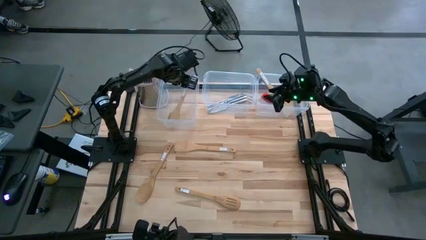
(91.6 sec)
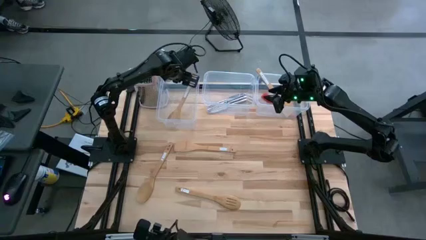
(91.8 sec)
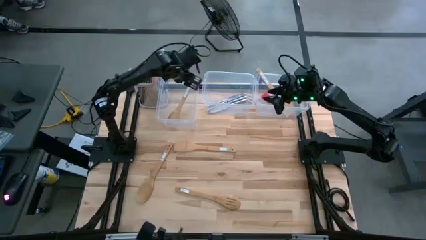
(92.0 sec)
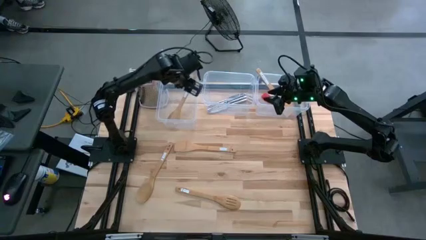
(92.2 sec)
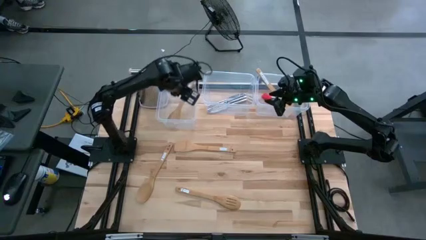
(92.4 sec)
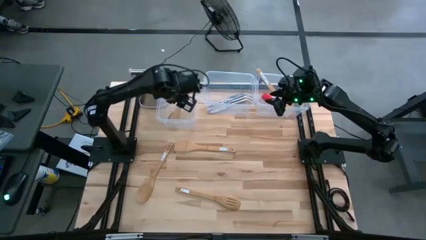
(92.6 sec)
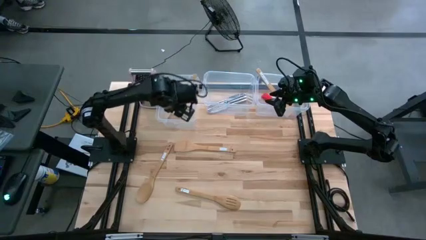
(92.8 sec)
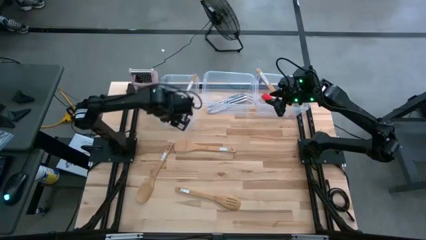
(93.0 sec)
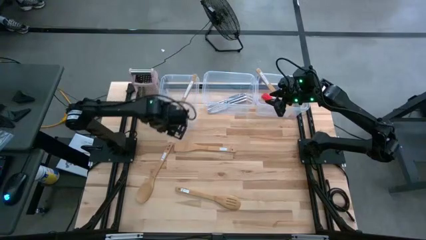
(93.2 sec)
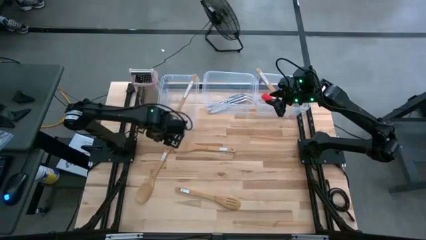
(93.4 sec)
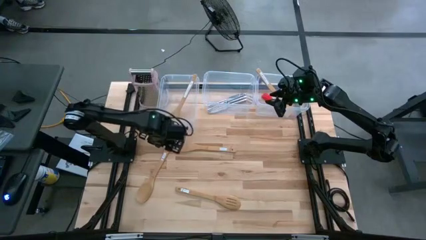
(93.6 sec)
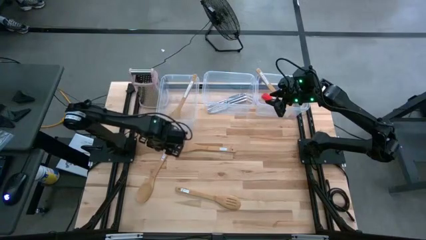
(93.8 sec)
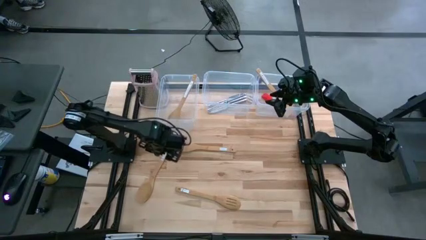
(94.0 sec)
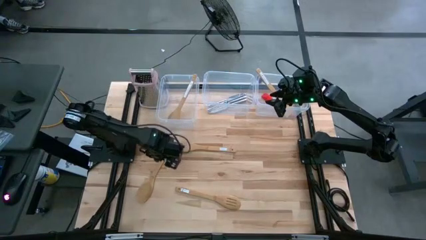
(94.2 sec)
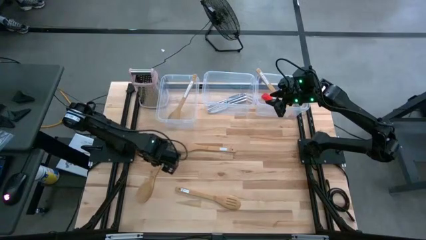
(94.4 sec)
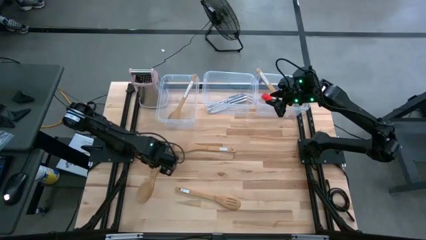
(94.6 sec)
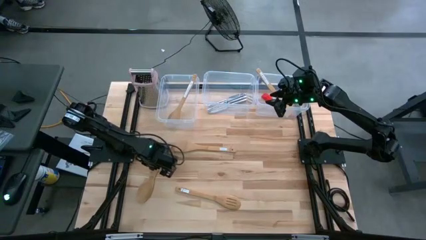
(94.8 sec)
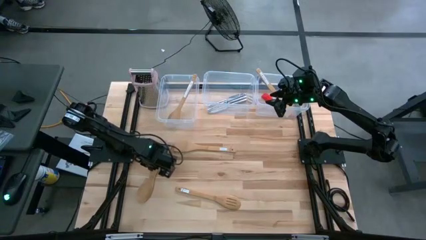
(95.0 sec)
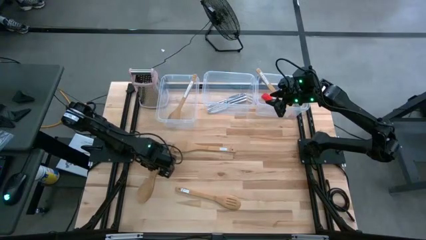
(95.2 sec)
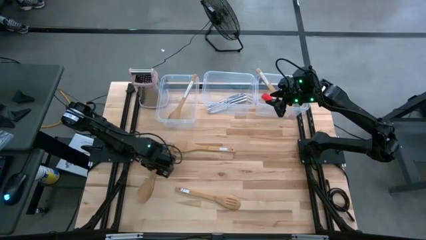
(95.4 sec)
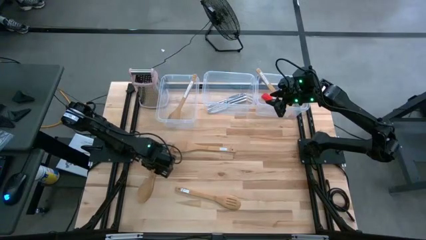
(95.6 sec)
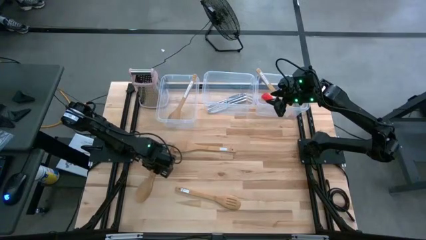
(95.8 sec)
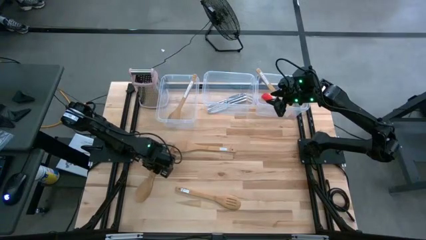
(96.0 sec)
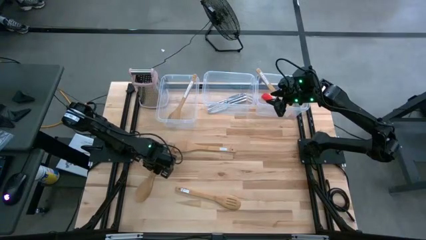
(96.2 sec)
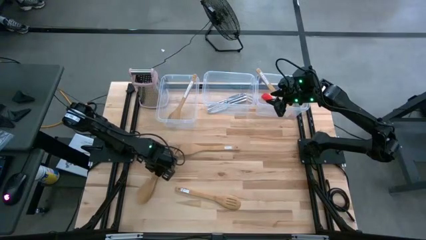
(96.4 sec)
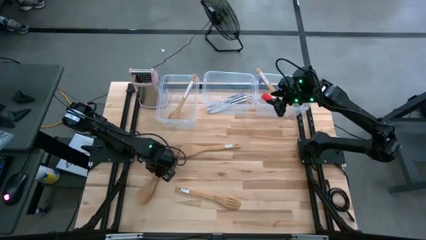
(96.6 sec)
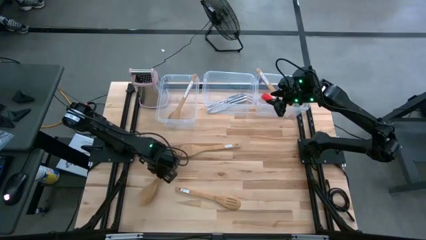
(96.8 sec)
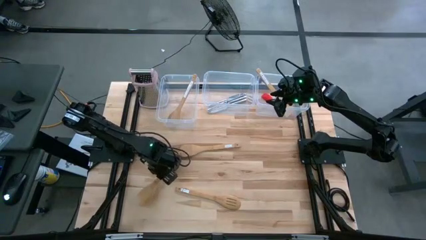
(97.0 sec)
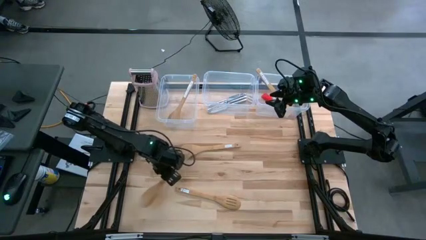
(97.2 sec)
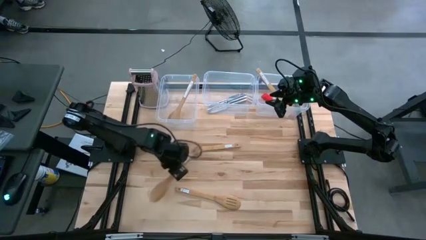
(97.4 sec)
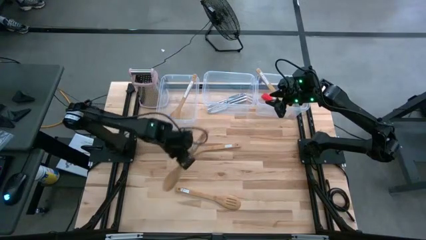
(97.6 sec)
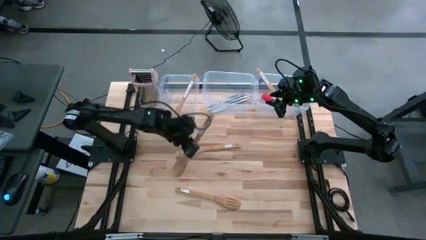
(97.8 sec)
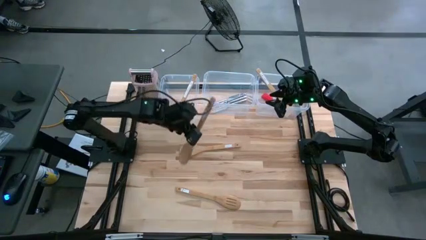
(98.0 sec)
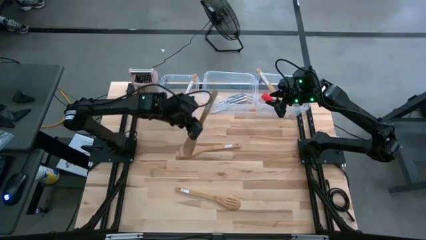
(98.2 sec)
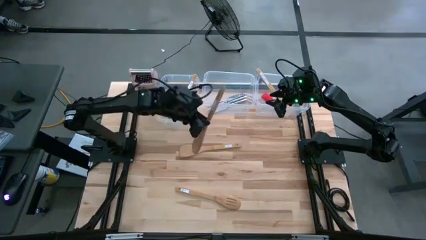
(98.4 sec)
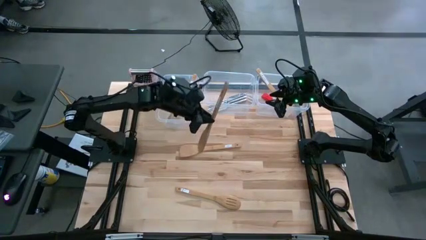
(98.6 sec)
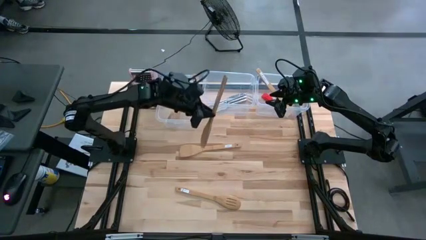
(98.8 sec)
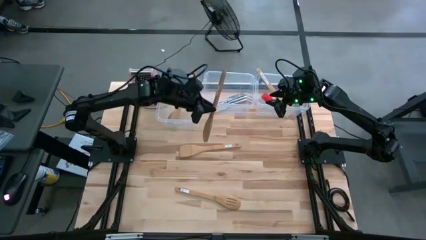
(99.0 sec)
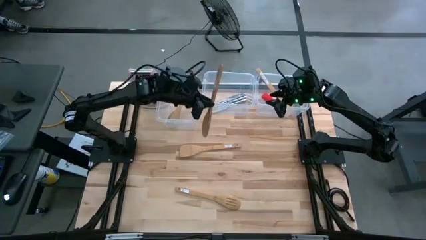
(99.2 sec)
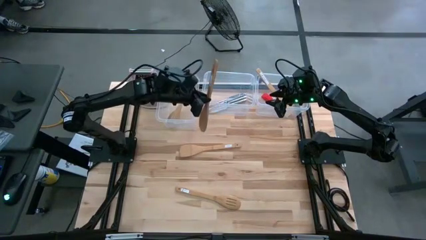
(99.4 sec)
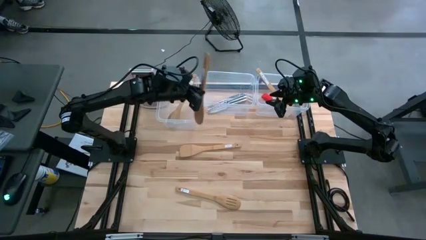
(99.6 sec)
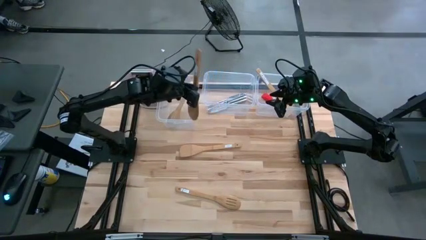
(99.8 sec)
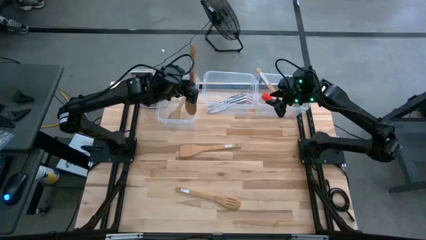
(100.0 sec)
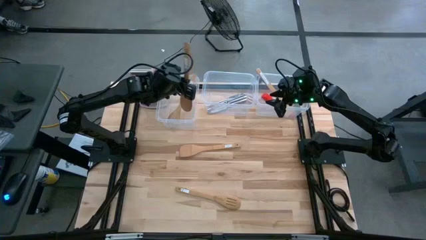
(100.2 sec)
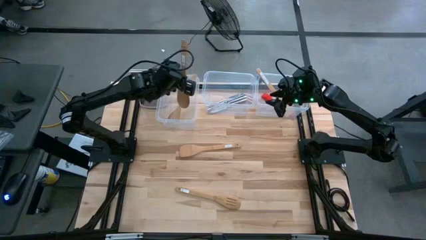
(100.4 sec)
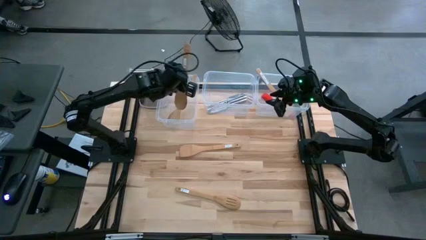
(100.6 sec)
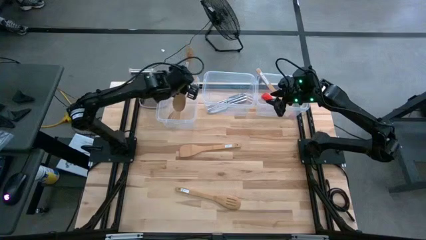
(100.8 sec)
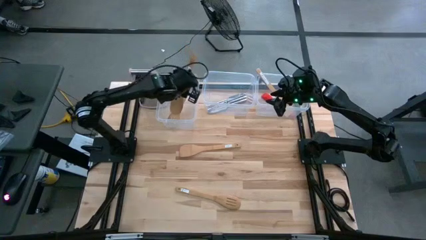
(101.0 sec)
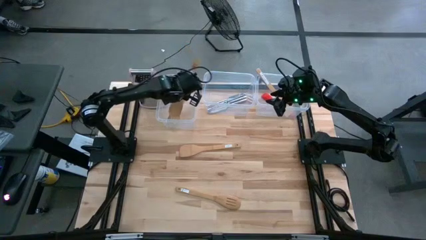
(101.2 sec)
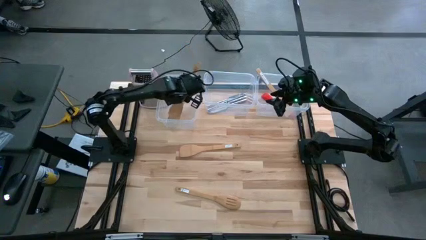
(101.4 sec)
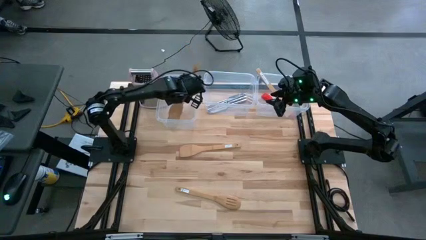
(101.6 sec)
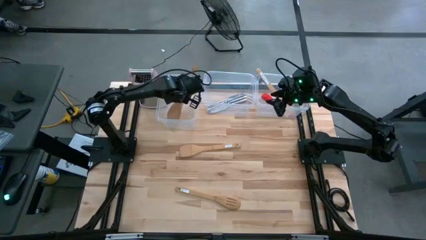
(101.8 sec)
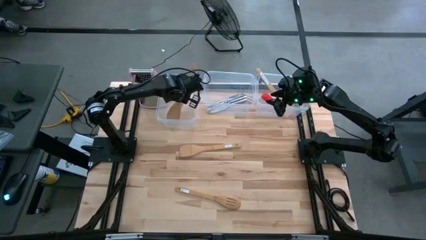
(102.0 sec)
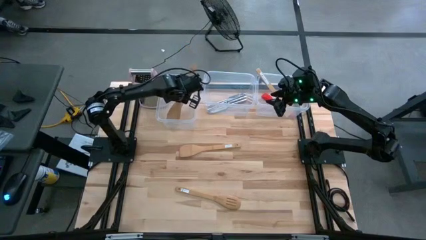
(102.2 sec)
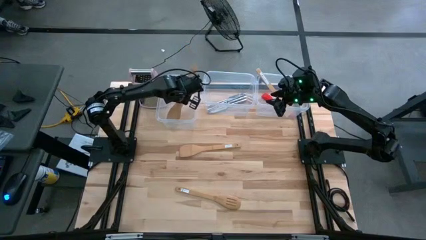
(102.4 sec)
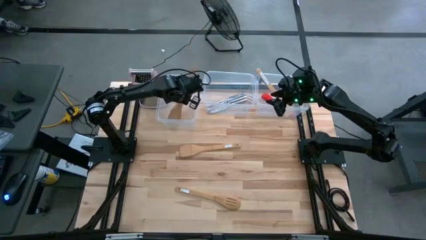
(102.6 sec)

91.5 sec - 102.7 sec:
Task: Pick & Place Kitchen Items
Put the brown serving spoon into the left transparent container

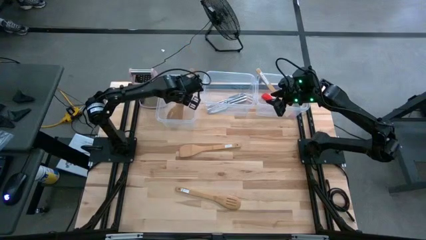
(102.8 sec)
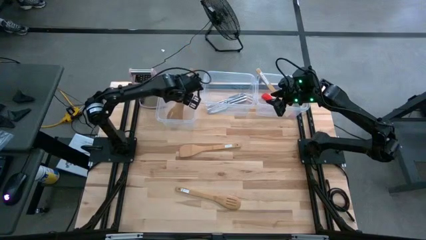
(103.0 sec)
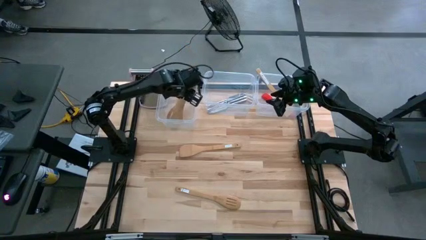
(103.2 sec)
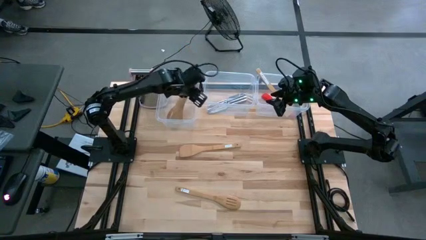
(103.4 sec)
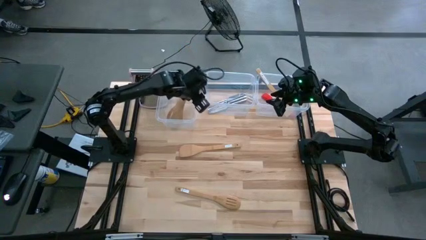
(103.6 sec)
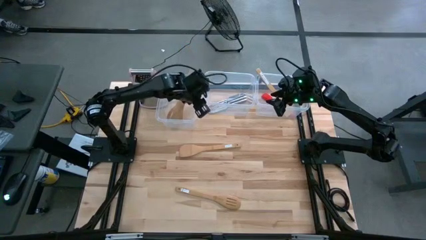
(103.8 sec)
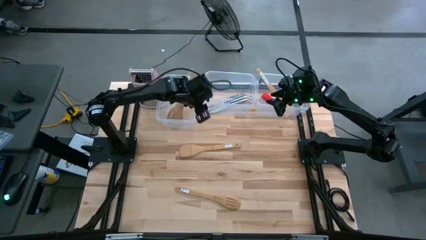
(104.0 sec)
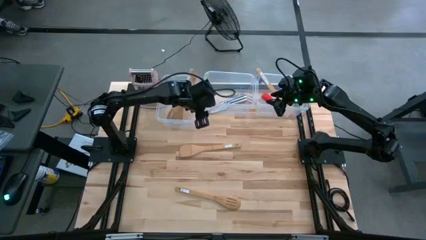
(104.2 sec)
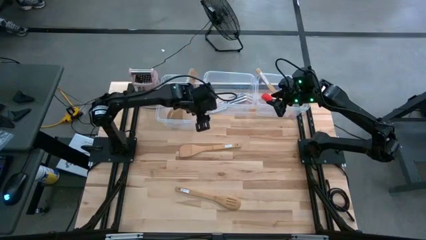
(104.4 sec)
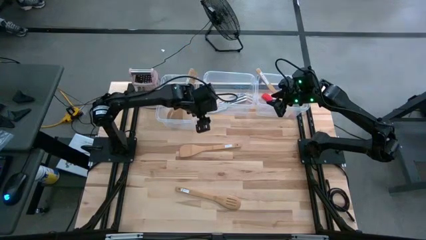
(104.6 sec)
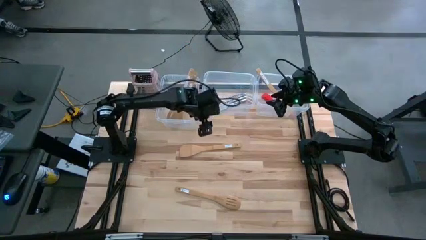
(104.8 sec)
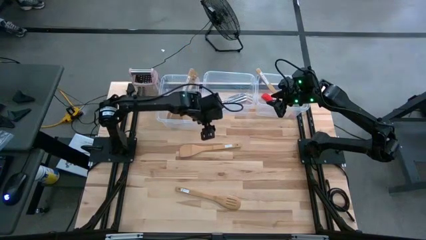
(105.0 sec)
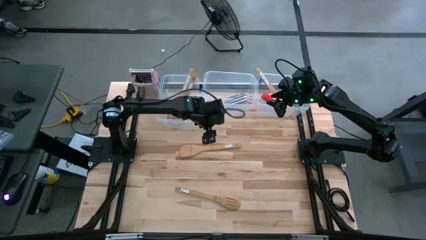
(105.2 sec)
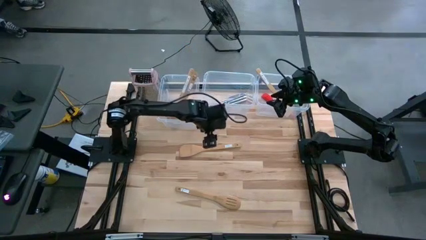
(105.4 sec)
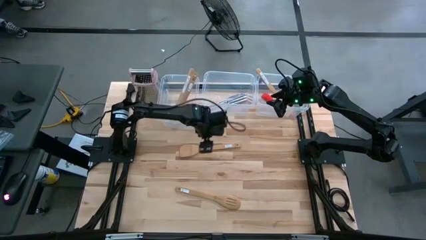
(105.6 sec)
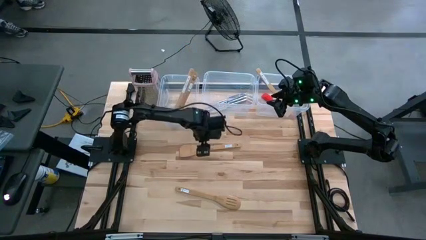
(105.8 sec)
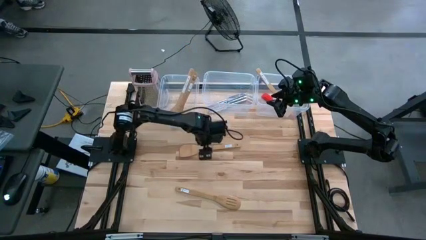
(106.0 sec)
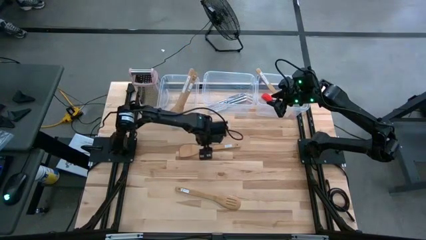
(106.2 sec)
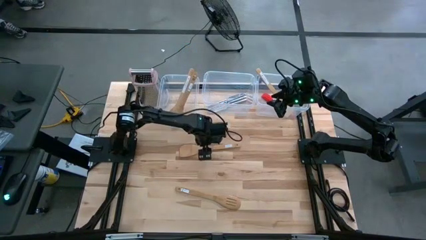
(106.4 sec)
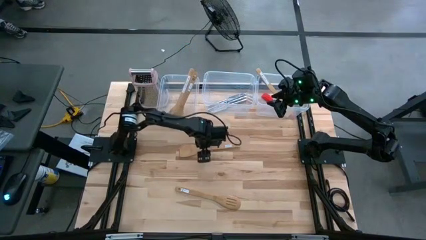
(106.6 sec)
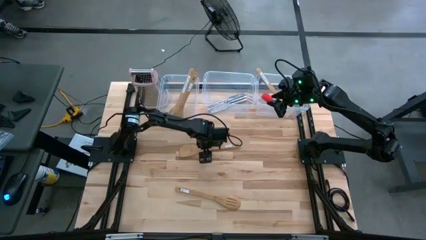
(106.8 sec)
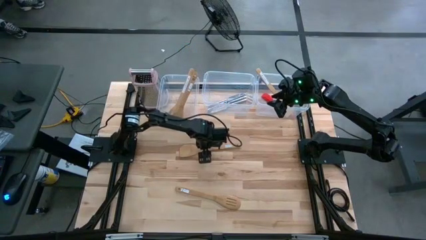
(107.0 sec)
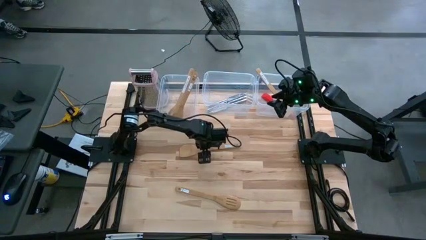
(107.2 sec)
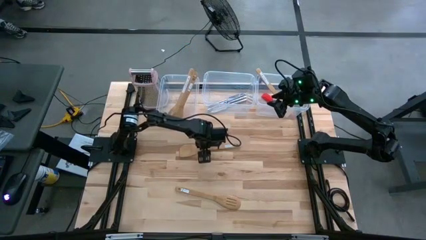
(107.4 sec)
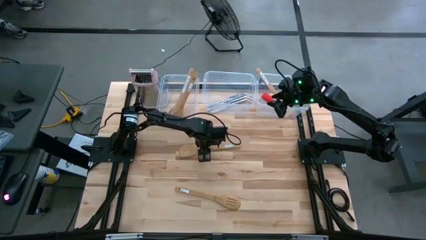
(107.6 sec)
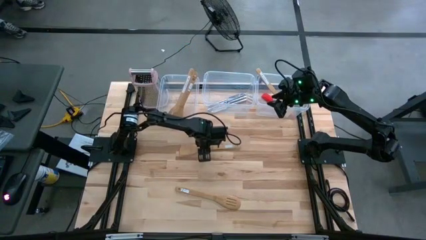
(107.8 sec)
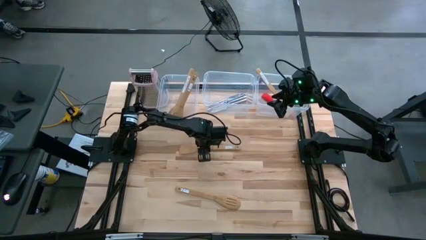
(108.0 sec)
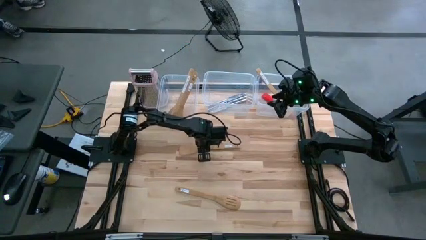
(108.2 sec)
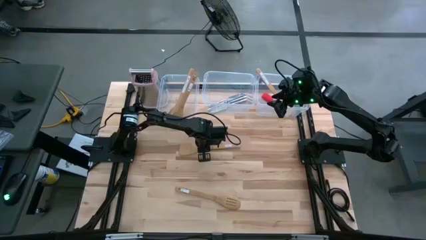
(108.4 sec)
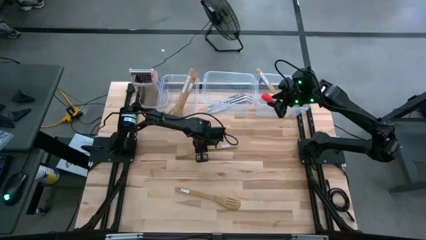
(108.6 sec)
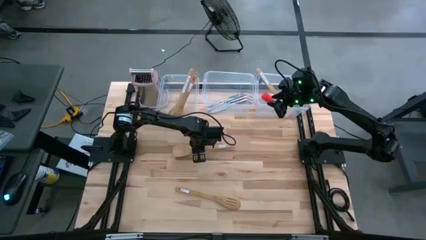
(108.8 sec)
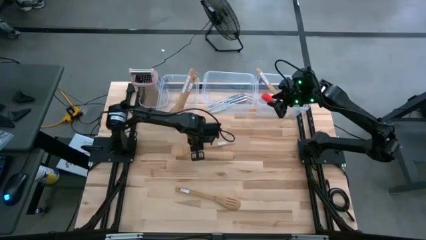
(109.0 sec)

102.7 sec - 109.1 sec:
Put the brown serving spoon into the left transparent container
